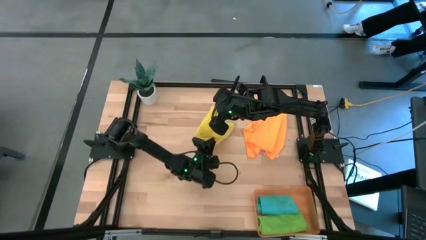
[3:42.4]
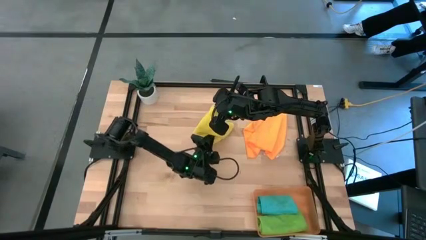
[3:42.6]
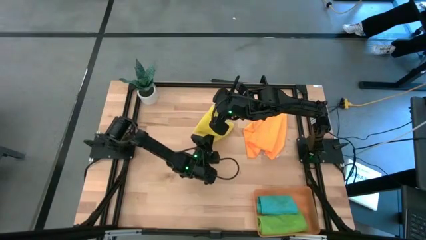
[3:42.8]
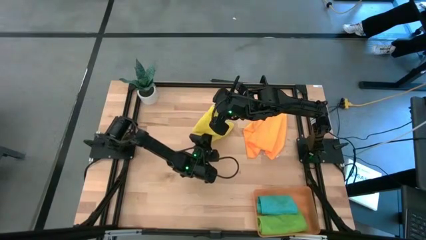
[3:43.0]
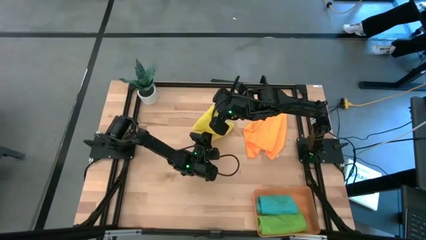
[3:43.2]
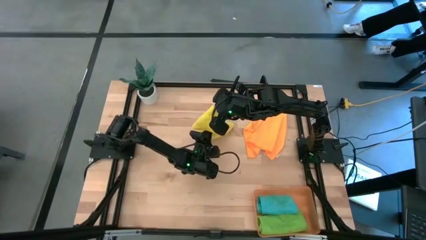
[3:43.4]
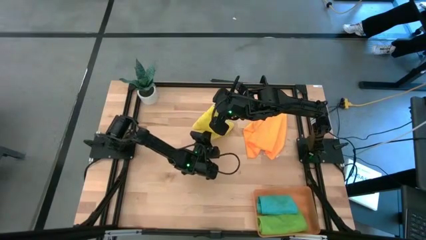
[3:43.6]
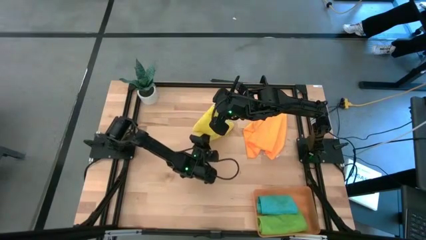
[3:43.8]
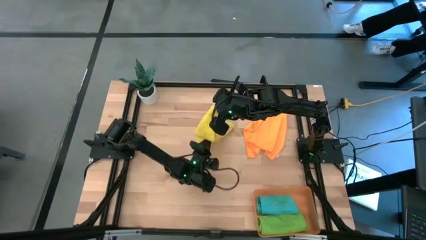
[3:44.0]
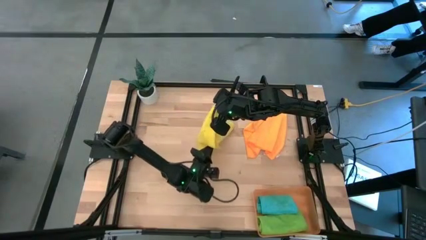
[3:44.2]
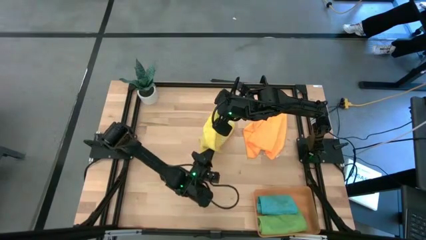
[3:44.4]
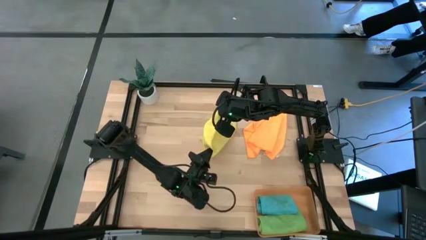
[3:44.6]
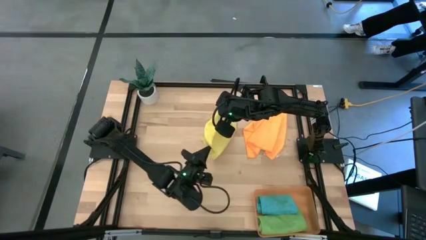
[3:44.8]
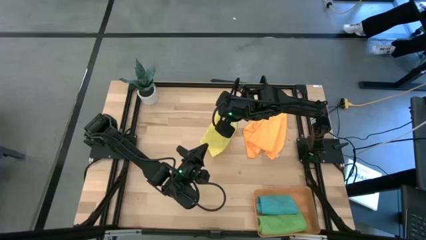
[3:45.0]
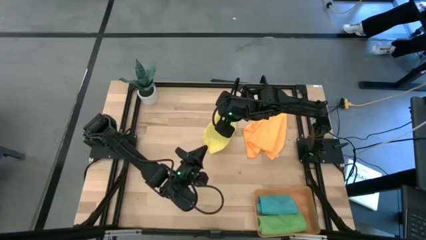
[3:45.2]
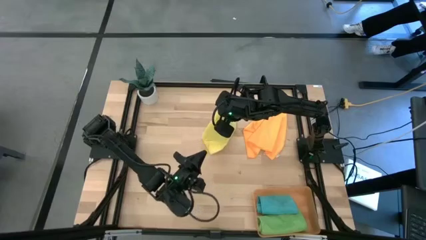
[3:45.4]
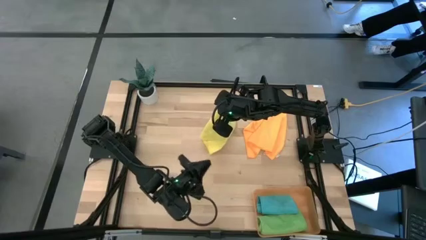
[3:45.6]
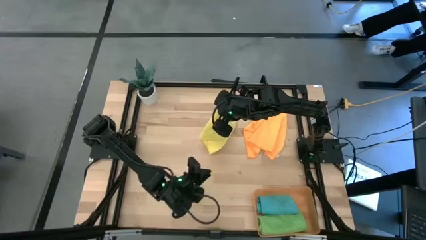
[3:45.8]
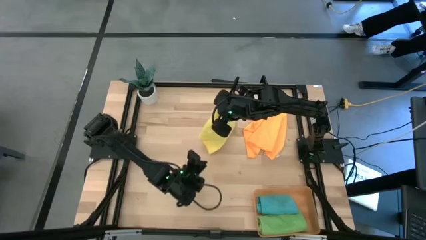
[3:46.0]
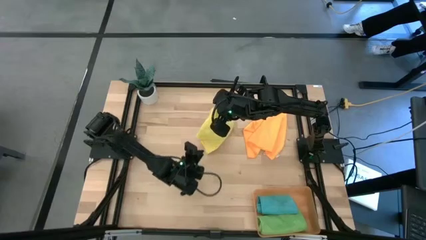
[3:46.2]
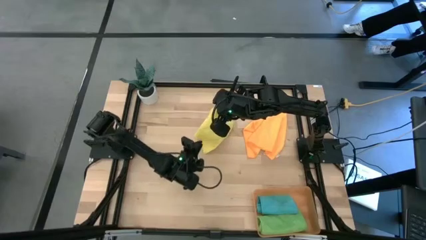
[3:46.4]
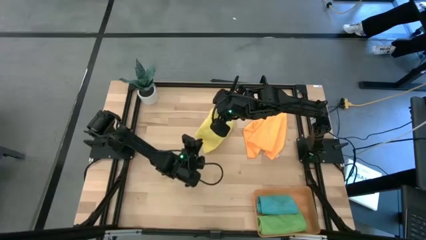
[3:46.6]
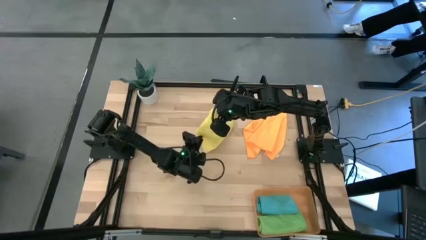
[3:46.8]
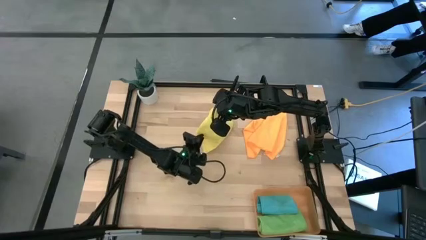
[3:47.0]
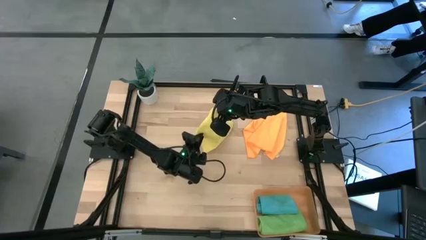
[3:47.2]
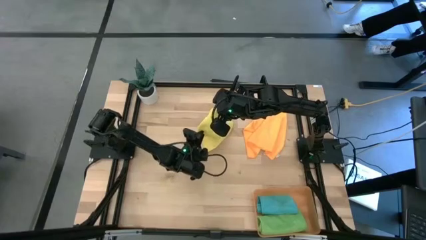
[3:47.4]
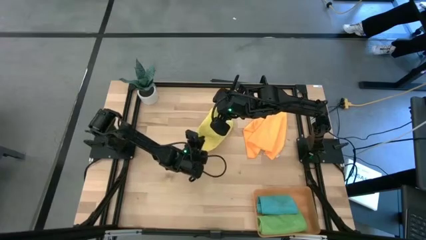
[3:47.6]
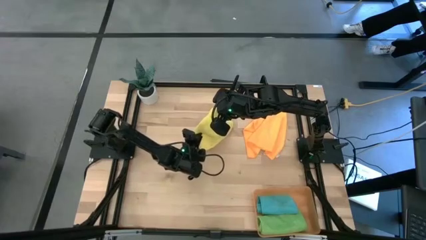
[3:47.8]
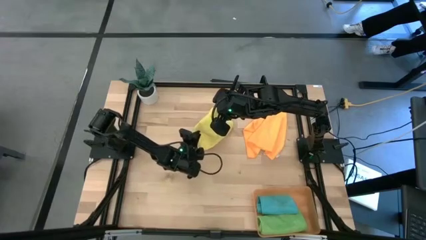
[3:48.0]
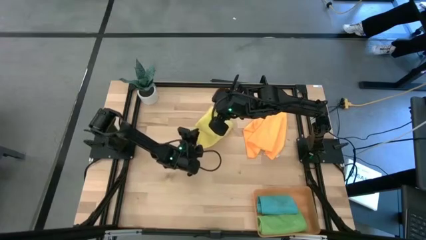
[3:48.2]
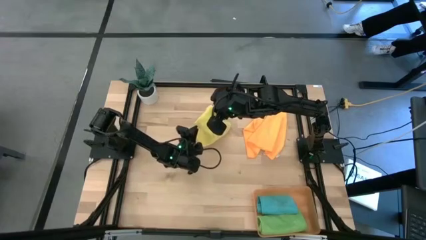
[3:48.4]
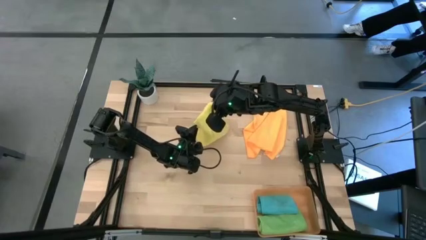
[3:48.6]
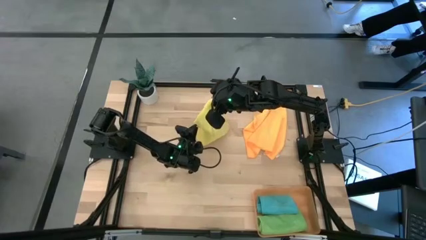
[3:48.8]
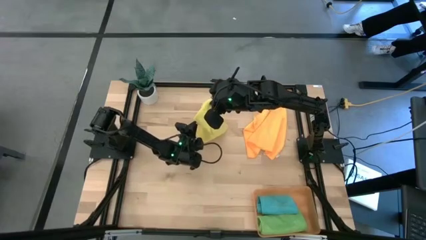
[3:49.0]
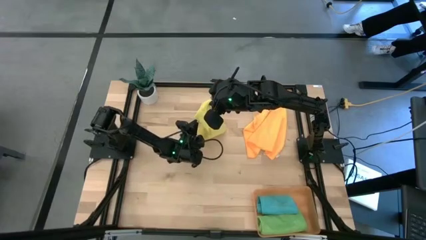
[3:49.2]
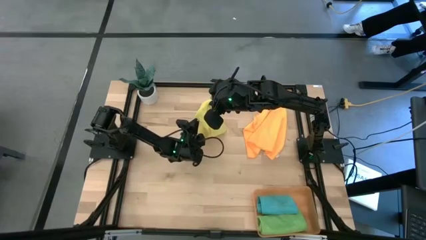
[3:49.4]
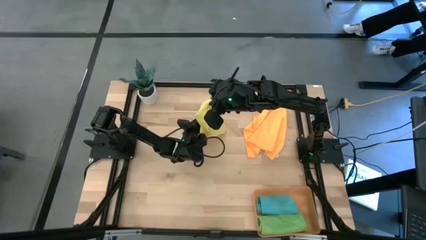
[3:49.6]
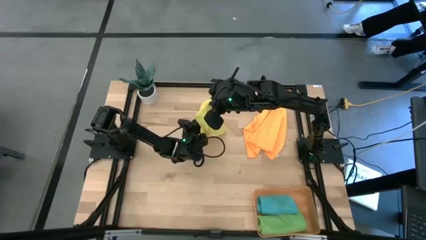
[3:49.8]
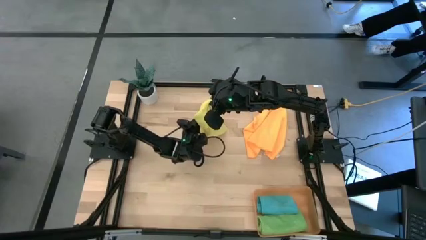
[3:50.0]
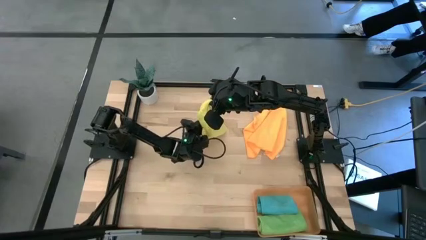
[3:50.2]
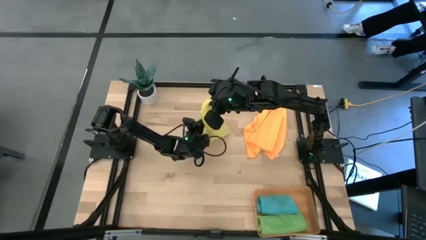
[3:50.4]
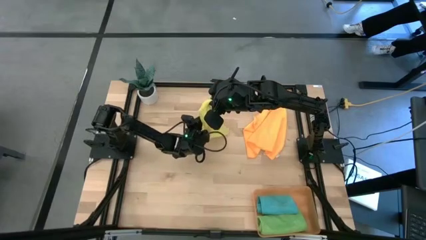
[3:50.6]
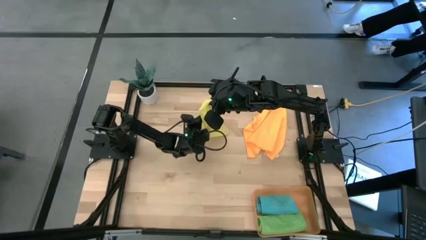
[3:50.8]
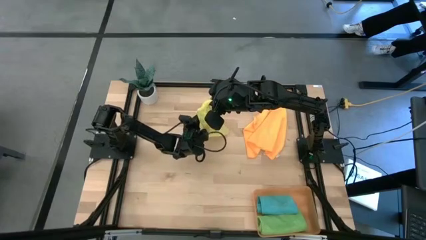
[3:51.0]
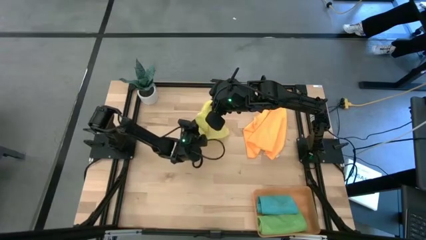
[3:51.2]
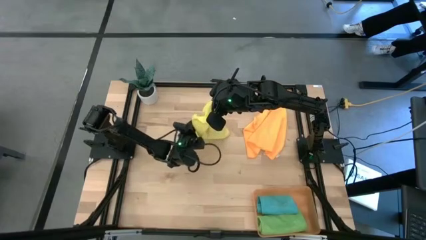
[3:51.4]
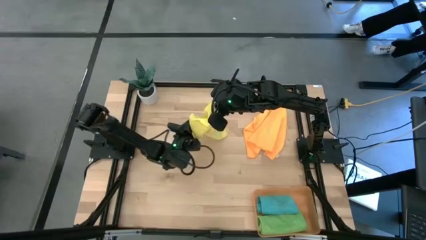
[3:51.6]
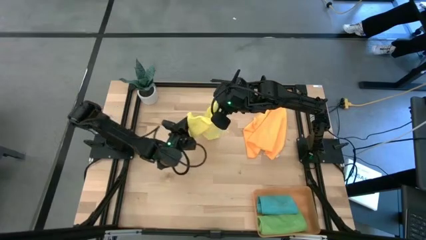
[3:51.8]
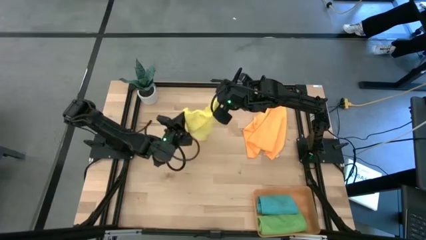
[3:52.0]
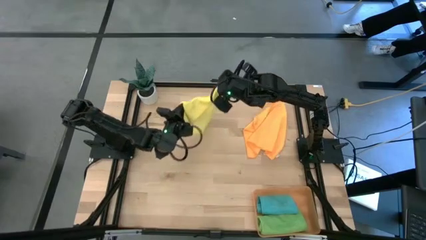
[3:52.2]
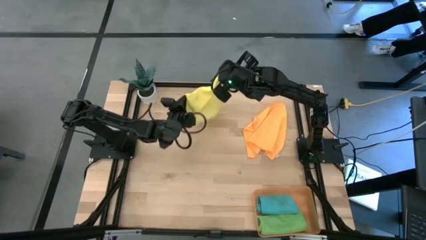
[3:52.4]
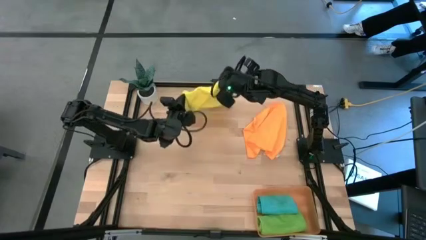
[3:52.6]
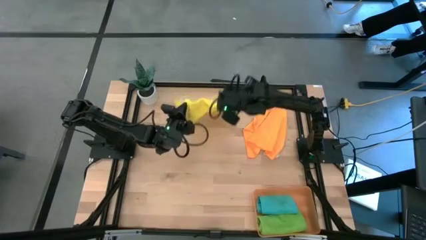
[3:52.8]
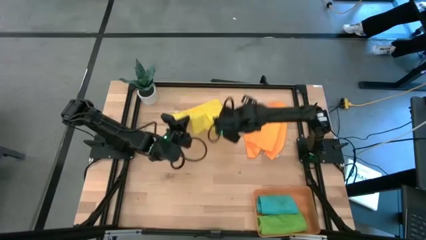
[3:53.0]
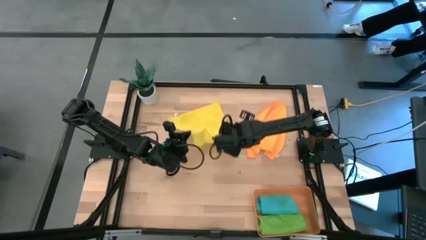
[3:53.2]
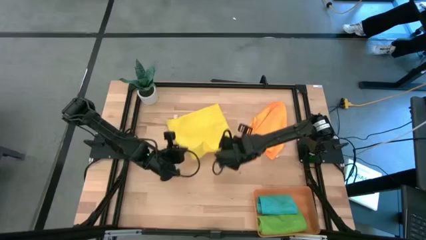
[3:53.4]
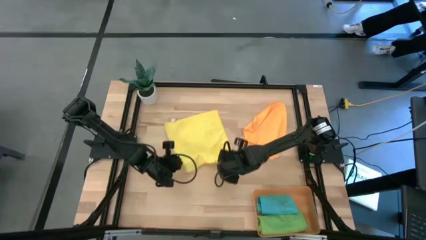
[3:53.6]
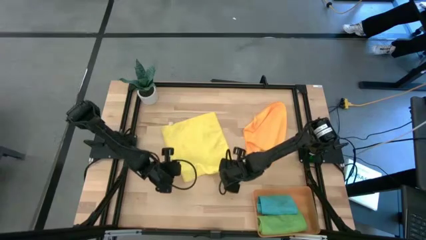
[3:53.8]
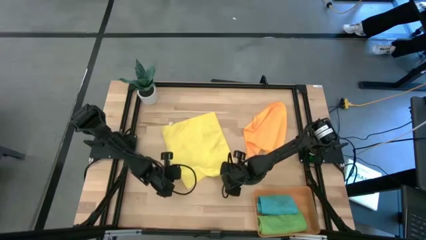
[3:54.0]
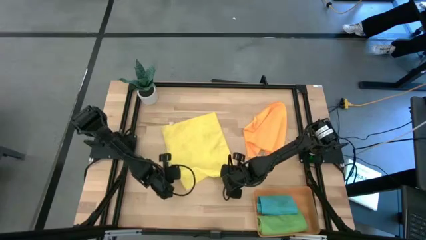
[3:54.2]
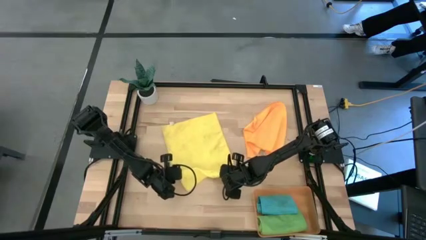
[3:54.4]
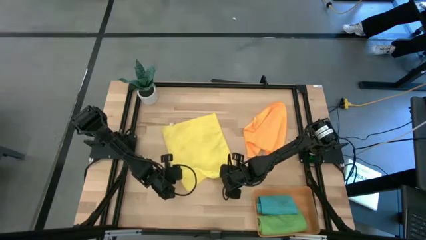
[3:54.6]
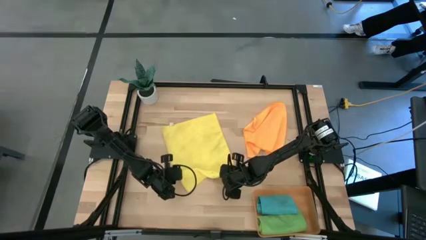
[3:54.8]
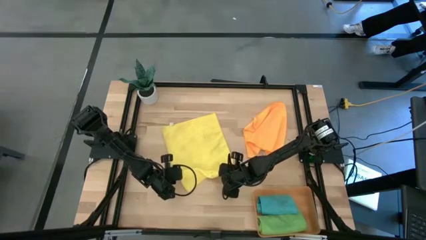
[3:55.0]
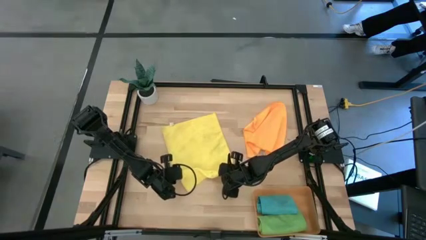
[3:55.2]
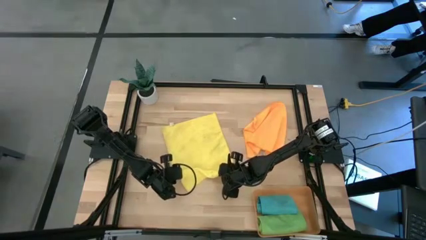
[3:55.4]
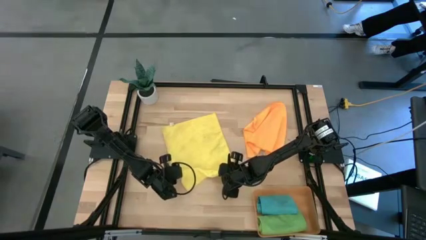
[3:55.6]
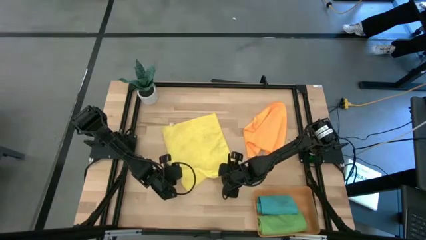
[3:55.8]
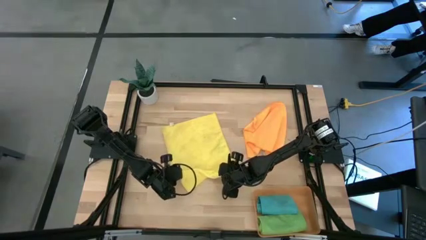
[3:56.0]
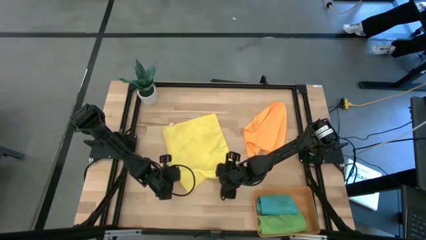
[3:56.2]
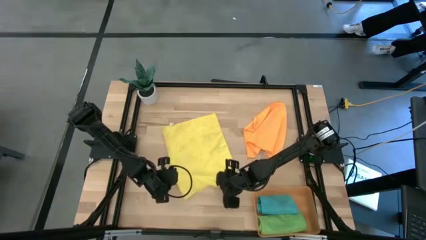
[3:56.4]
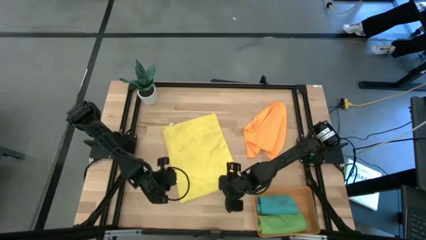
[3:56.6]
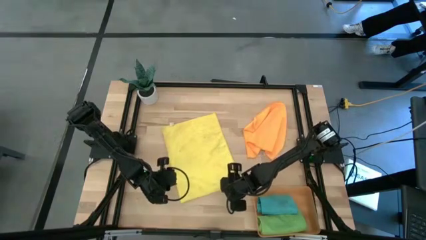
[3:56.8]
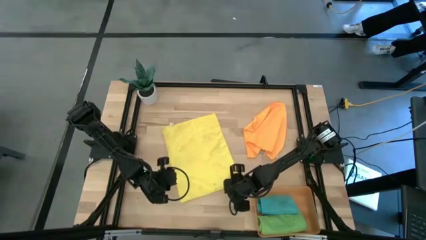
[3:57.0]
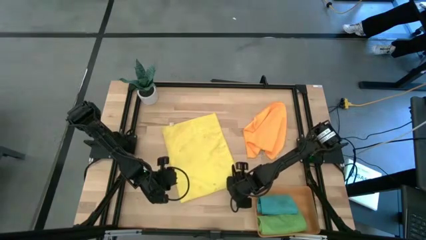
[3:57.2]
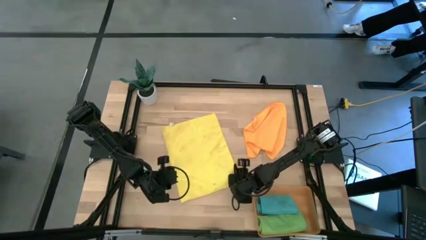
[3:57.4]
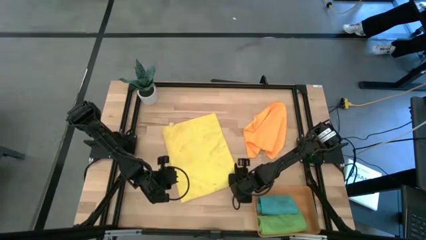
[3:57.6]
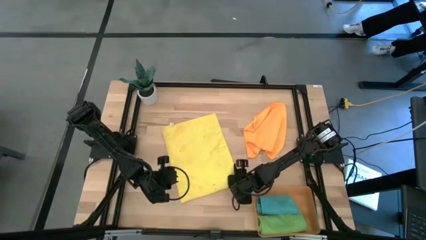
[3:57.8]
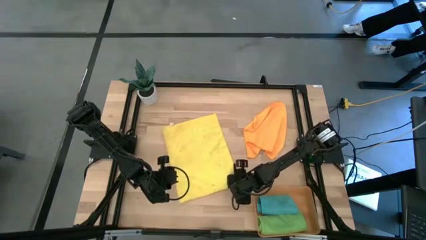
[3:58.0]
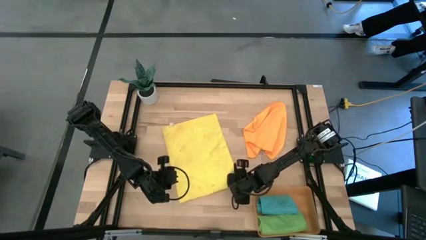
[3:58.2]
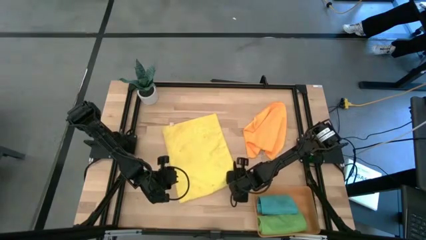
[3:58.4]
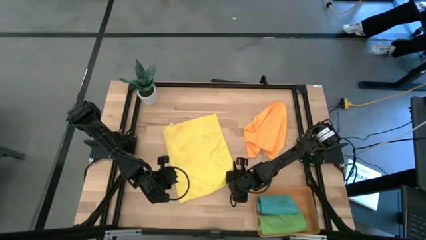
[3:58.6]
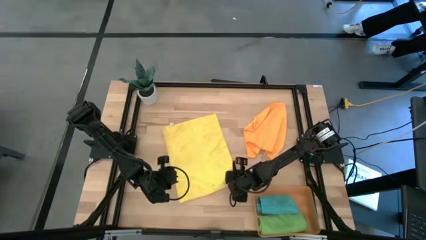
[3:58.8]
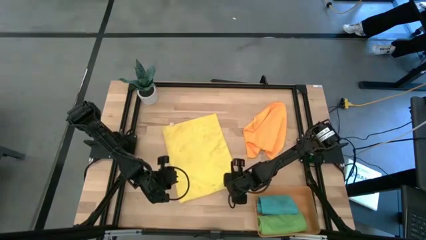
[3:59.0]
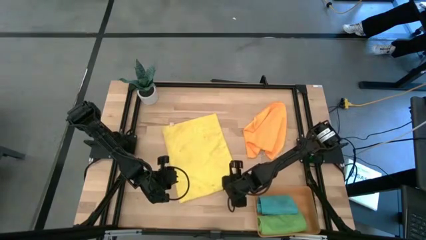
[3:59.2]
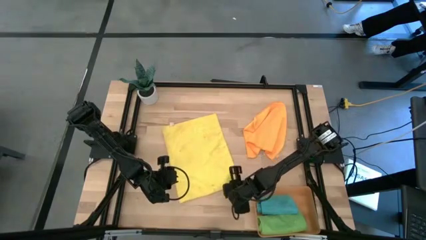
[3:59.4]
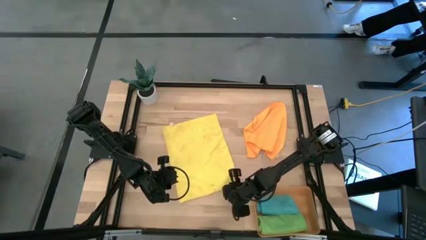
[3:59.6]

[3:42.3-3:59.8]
Task: Roll microfiber towels into tight, uniform cylinder then place into a basket
Roll the yellow microfiber towel
